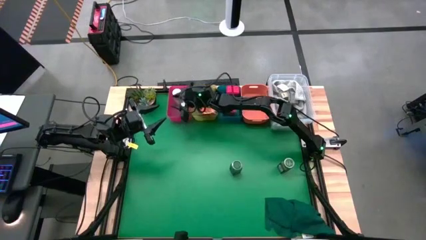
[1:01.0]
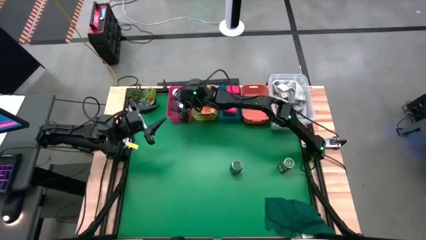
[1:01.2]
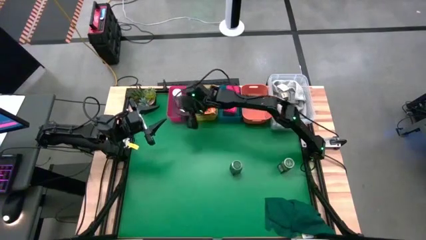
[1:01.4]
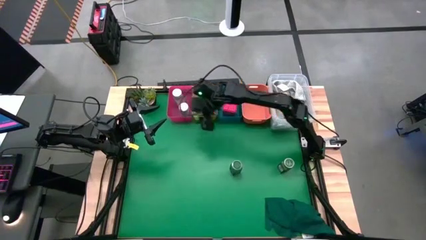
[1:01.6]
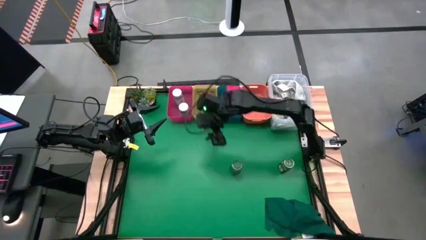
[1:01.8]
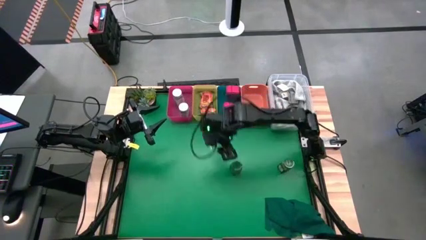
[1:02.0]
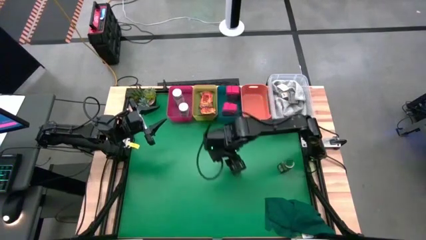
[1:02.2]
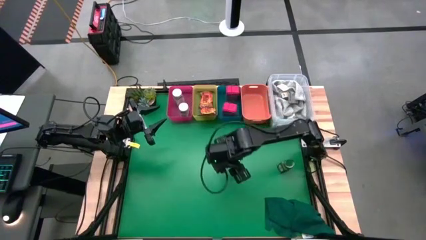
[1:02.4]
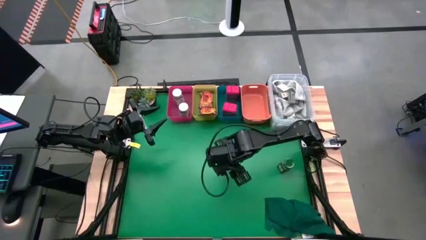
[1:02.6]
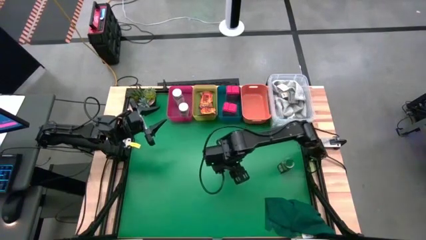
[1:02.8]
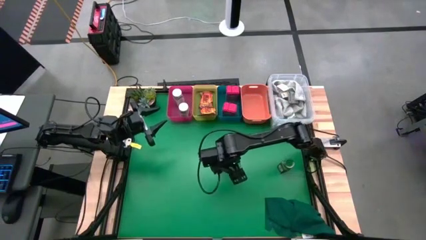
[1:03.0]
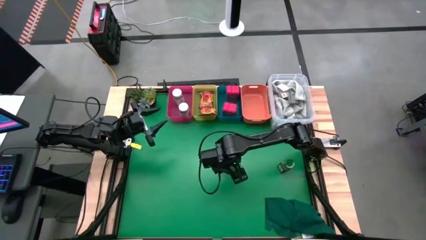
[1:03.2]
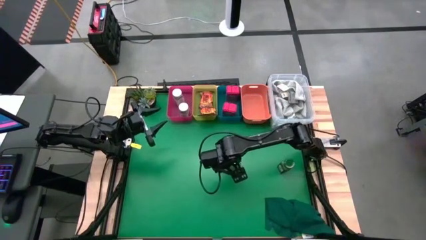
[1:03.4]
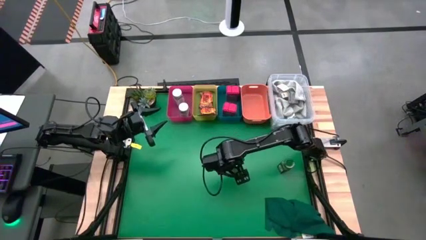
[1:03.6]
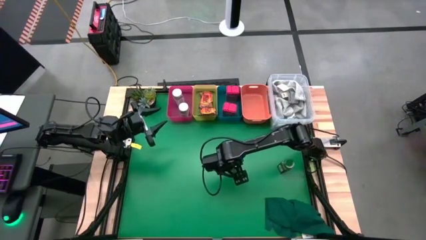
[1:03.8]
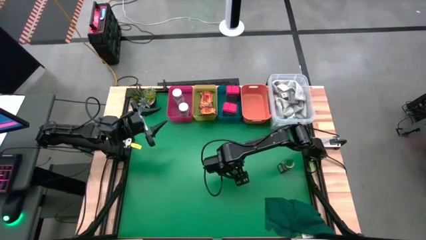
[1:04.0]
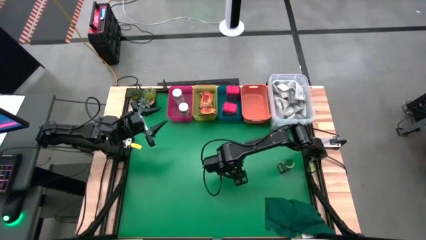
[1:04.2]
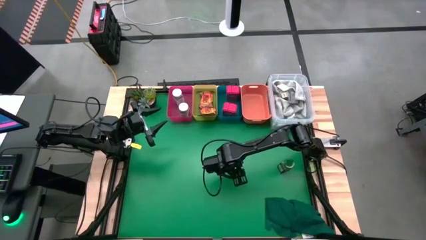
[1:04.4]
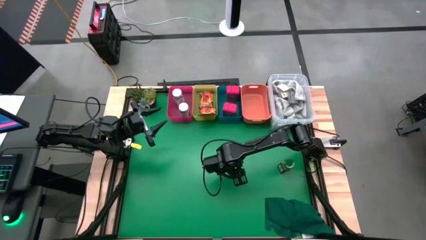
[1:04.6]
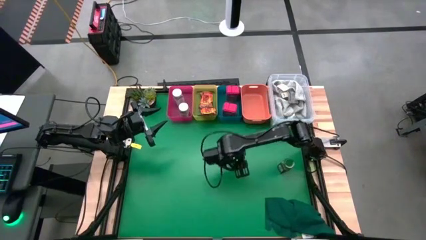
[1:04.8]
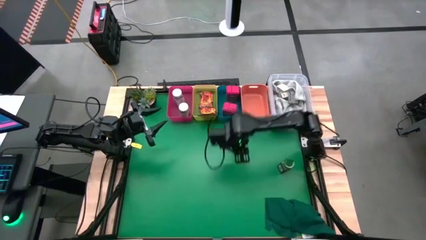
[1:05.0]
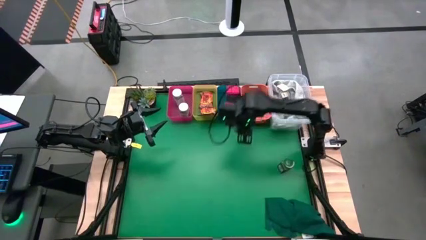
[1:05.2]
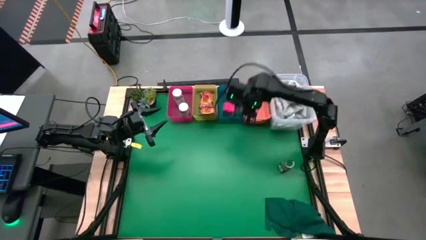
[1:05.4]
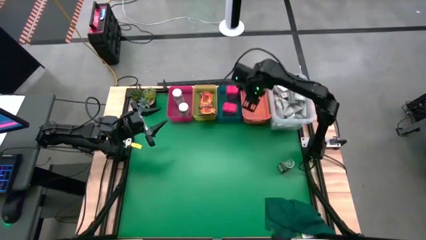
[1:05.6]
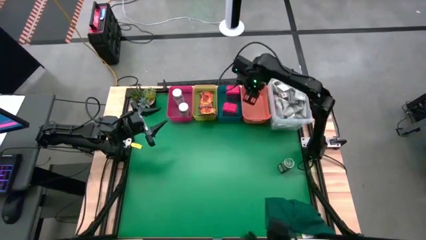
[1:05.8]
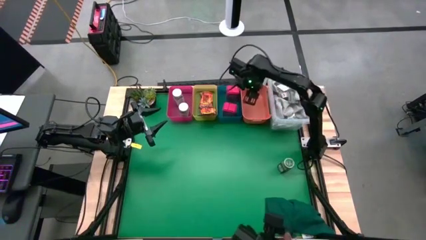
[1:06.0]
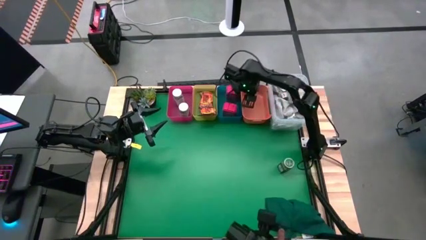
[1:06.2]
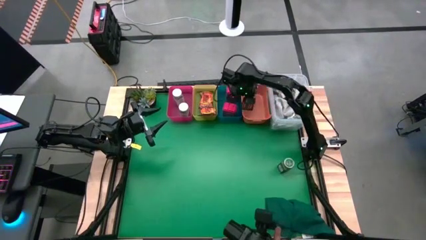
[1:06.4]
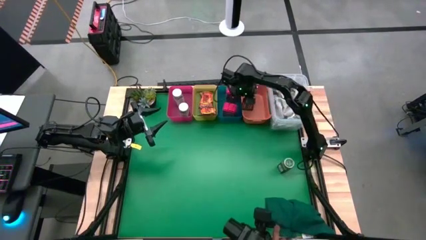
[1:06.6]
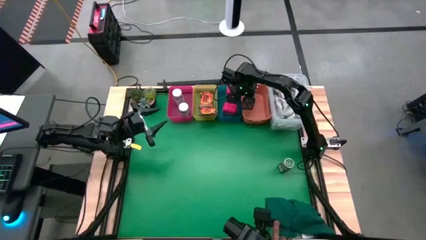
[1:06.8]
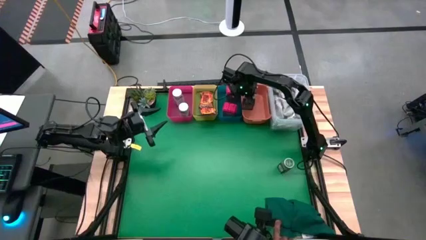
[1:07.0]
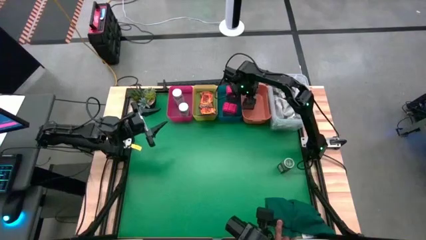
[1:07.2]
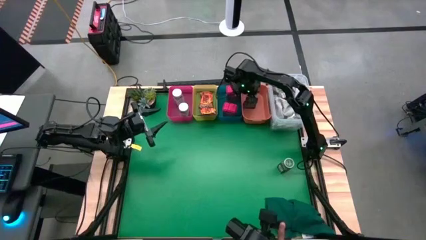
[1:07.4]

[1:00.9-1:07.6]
Task: Sort spices by type
Put the left green seasoning bottle into the orange bin

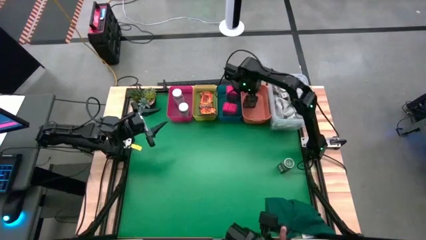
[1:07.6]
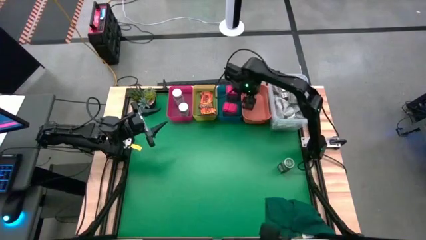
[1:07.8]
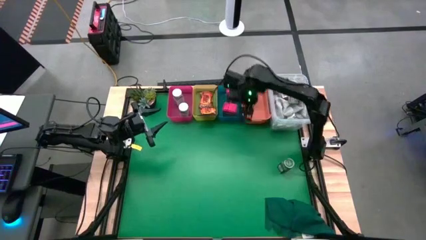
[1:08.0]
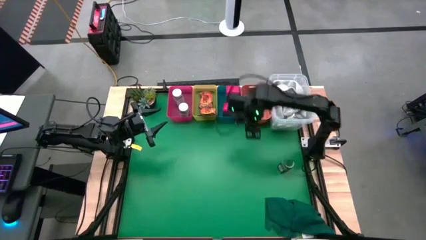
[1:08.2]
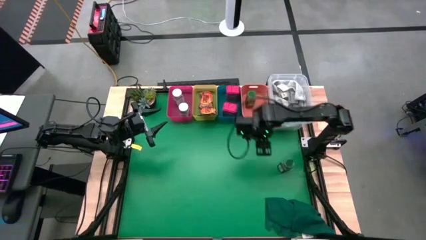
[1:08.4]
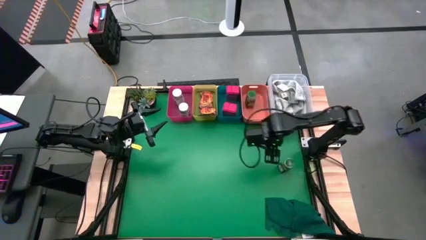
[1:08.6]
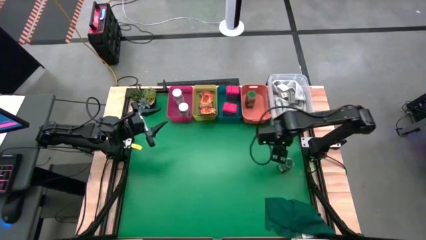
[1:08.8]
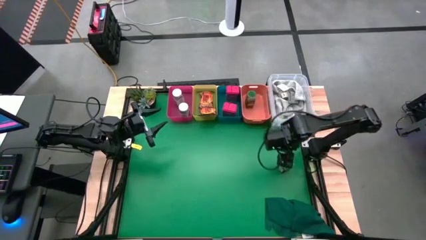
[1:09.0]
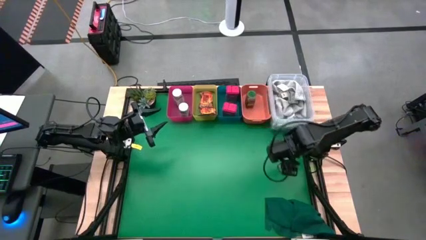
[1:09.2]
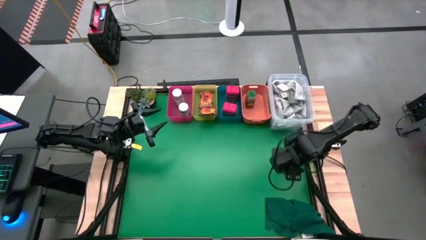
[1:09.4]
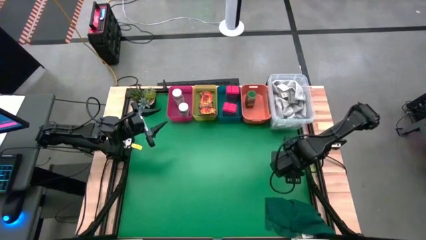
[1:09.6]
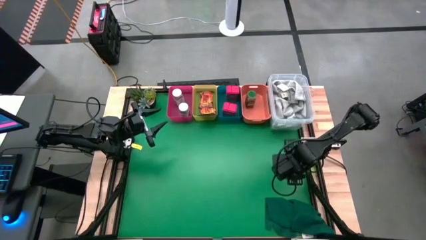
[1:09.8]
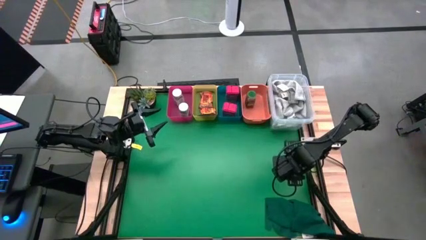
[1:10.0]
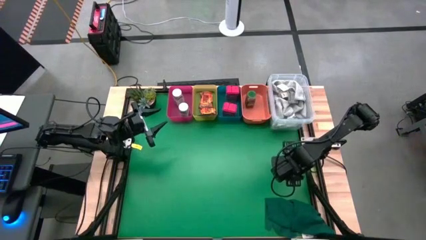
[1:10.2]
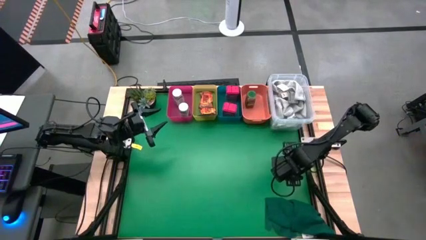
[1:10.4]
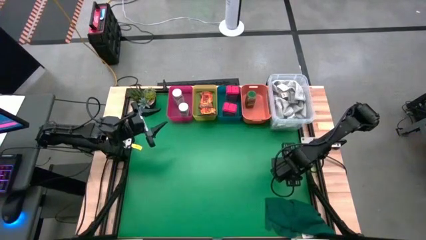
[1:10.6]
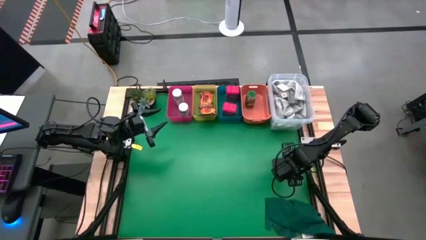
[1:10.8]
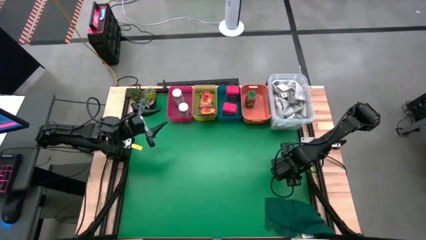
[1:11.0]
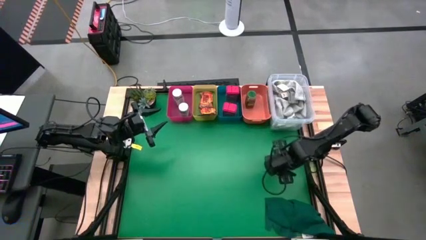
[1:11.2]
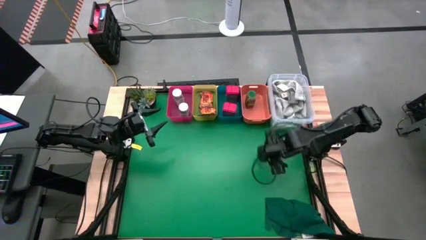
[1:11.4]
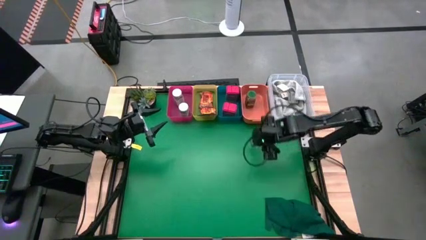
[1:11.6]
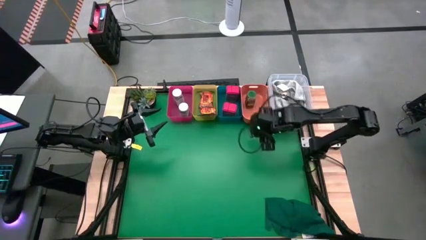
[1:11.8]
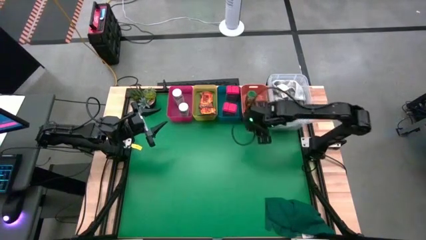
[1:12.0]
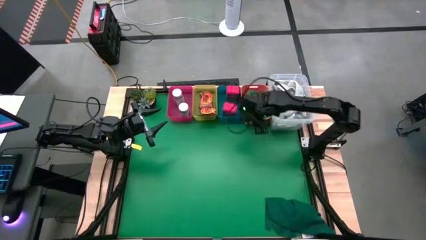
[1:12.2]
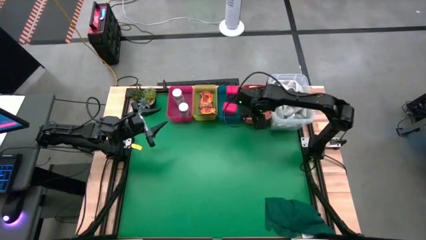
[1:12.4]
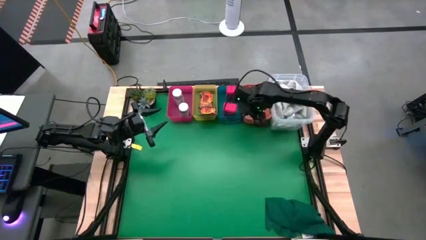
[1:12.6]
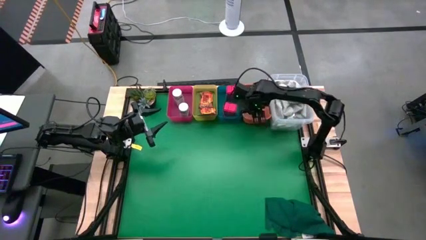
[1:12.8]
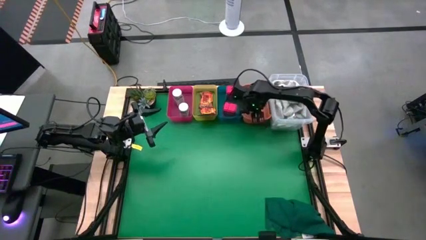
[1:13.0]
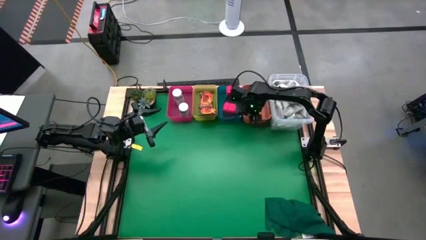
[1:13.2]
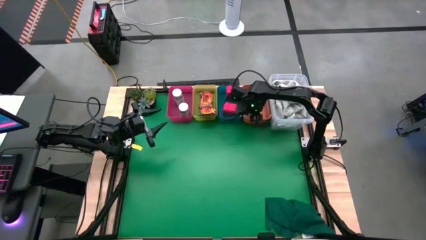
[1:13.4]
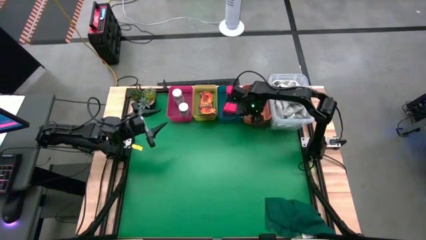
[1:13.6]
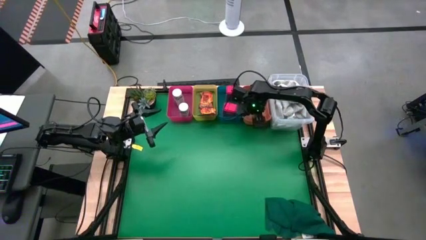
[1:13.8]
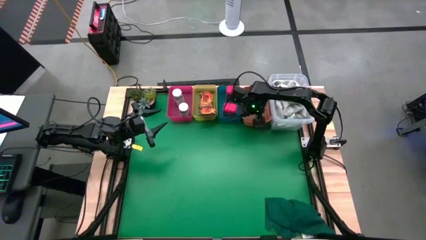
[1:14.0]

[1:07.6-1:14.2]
Put the green seasoning bottle into the orange bin

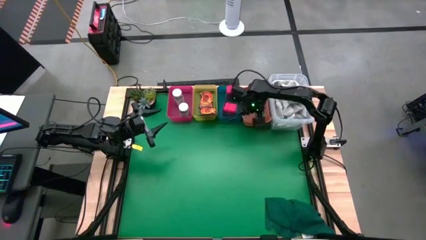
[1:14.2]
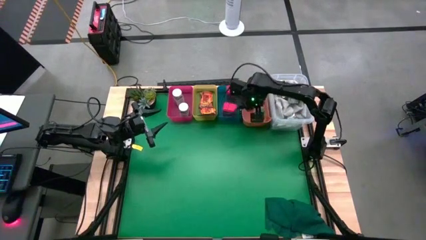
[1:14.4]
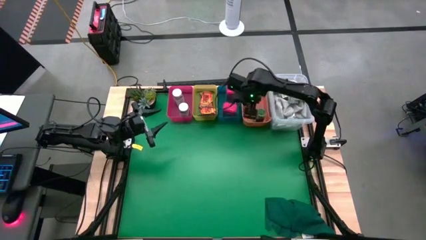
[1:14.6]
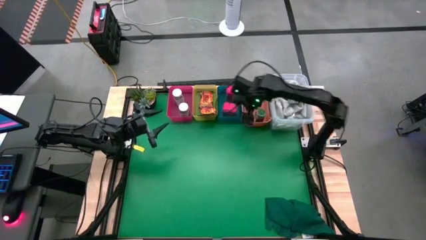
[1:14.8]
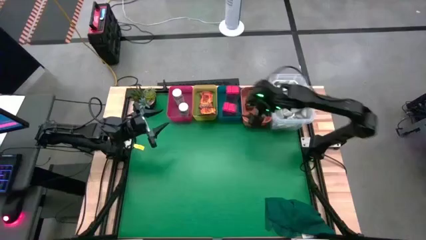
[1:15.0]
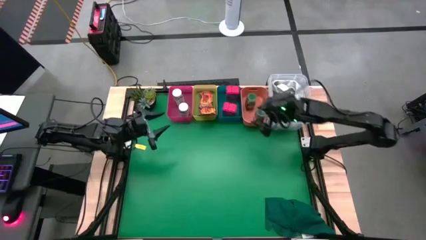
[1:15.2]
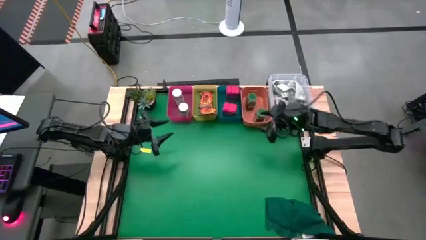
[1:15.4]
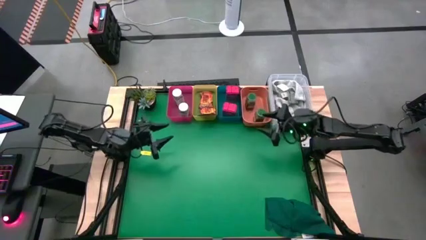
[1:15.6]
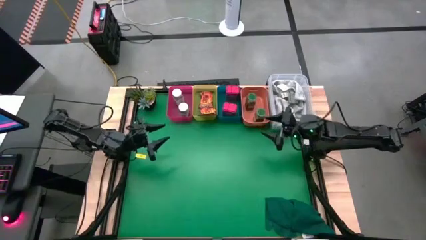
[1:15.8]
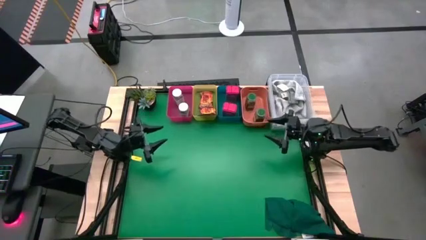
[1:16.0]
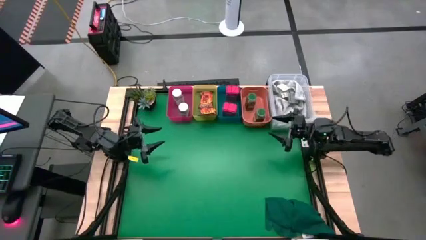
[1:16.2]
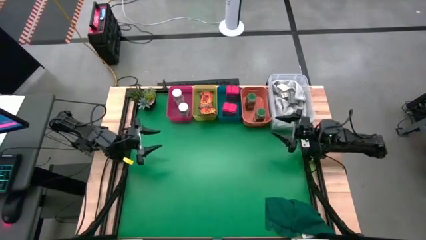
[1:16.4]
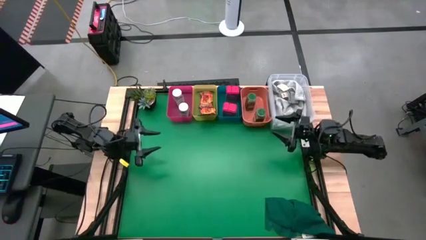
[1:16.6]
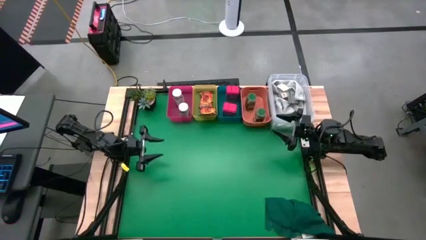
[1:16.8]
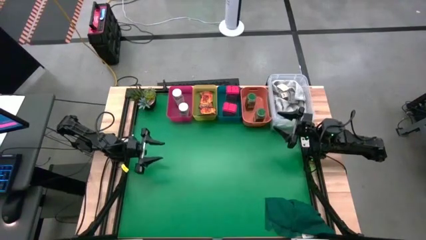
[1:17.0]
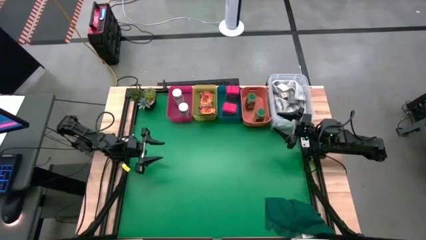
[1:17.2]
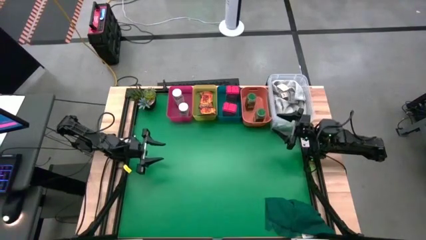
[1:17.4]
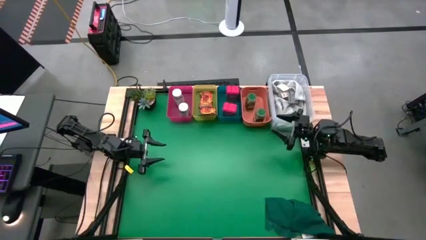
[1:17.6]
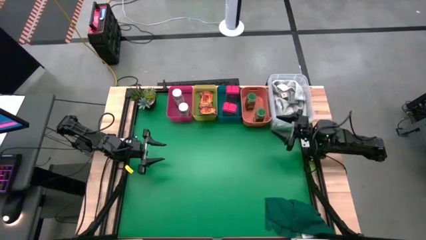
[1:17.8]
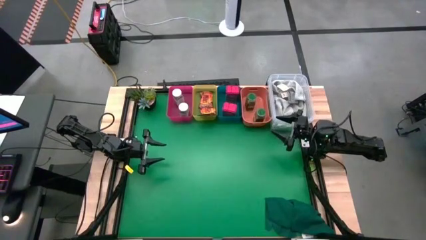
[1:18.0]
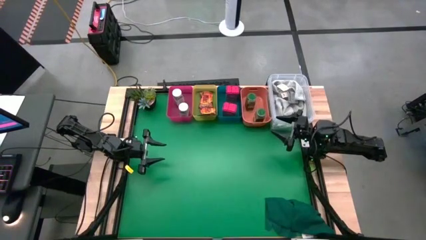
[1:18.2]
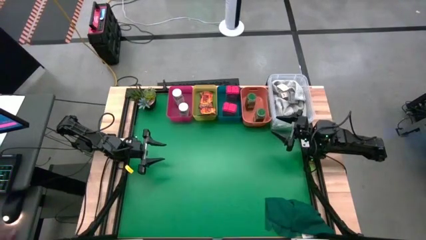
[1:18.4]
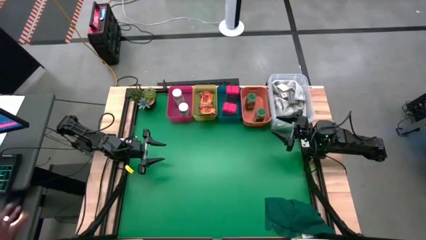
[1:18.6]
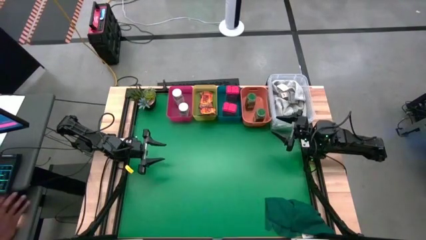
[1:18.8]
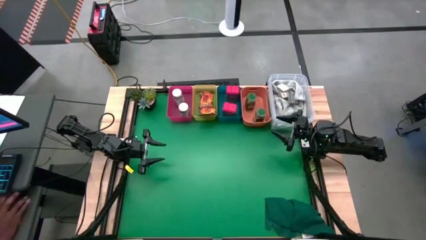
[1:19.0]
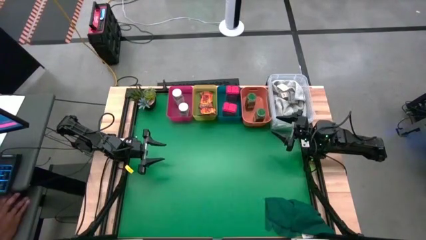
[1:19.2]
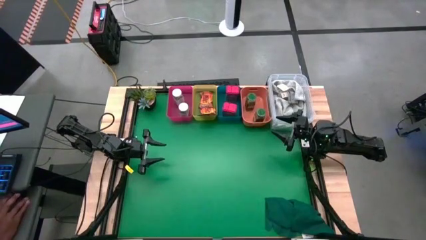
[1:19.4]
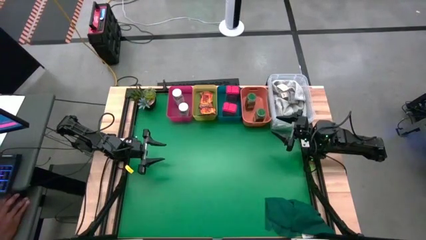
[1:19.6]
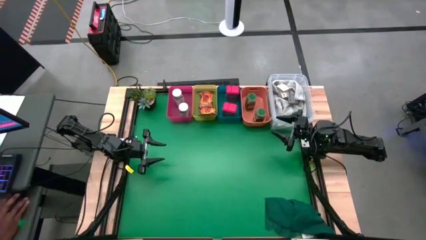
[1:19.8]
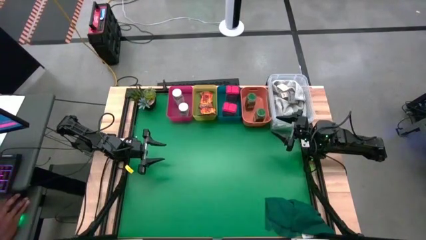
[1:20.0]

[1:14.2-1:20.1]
Return to Home Position
